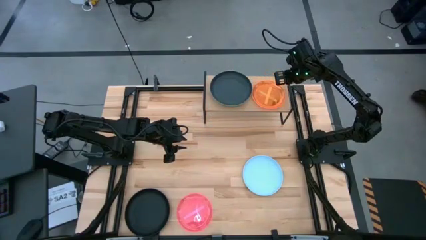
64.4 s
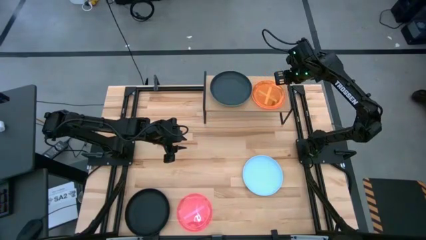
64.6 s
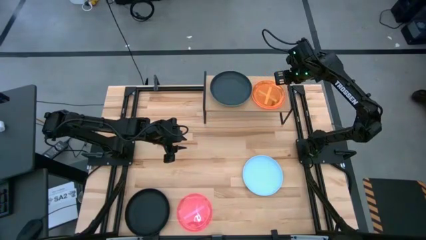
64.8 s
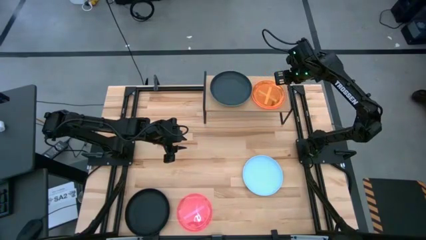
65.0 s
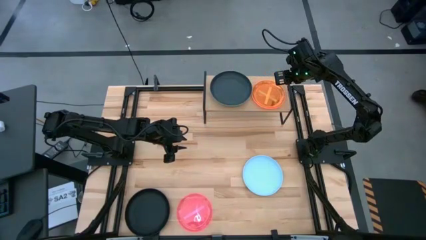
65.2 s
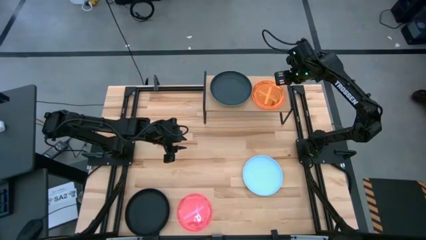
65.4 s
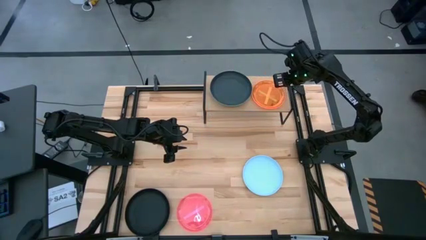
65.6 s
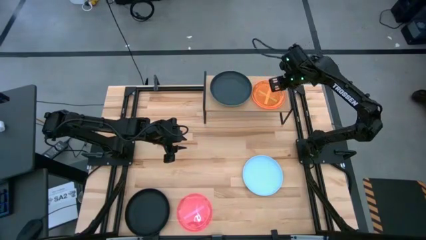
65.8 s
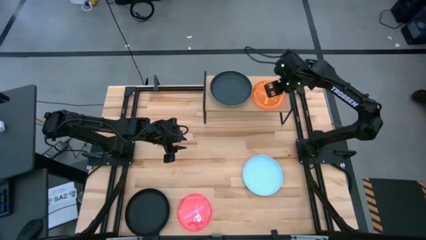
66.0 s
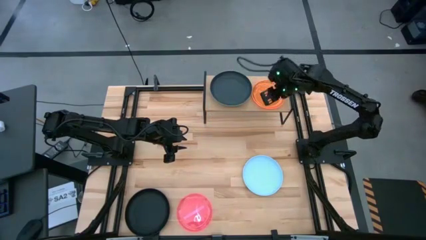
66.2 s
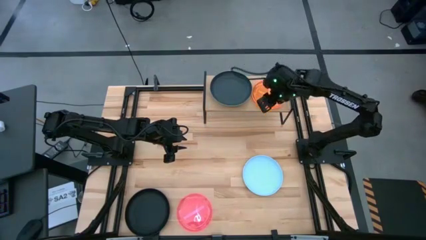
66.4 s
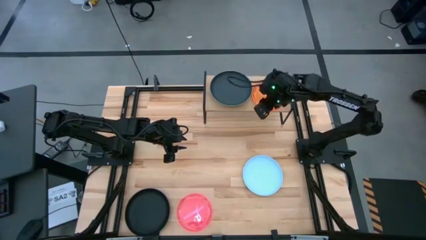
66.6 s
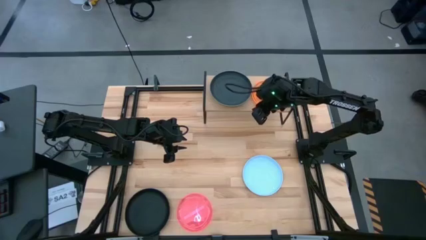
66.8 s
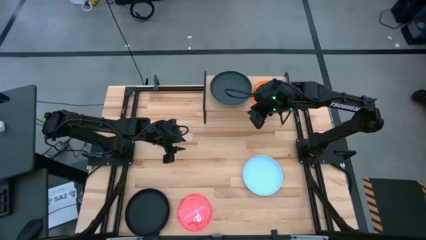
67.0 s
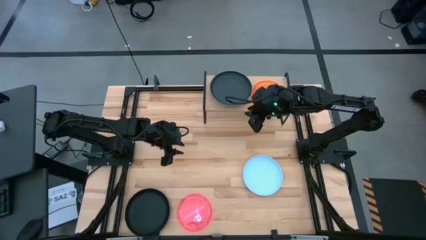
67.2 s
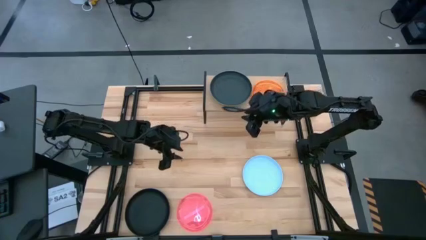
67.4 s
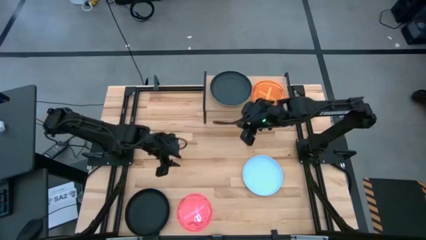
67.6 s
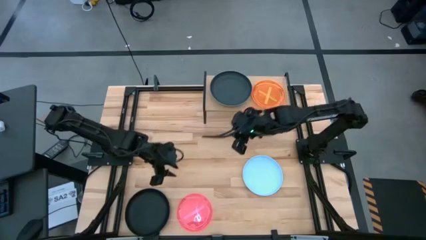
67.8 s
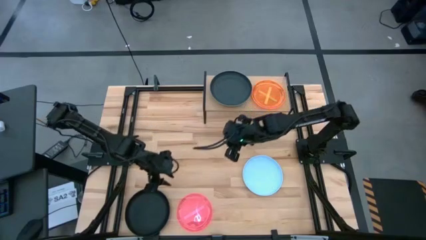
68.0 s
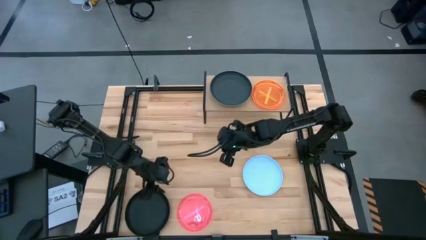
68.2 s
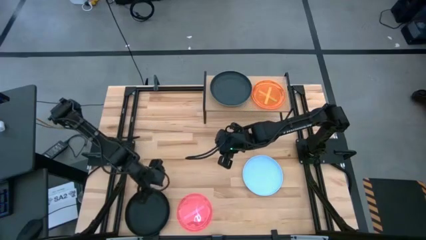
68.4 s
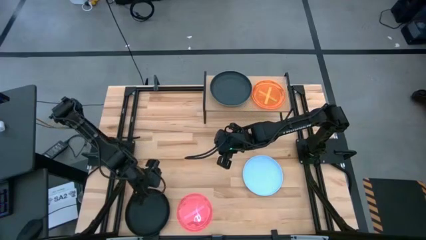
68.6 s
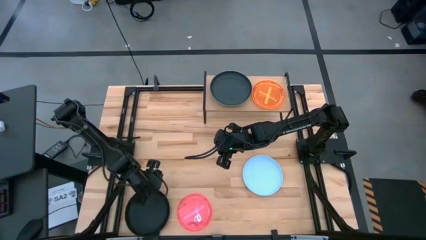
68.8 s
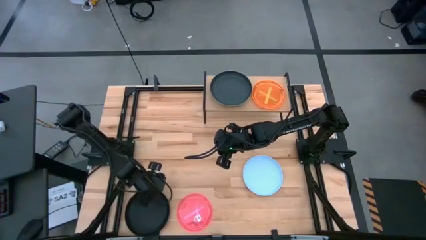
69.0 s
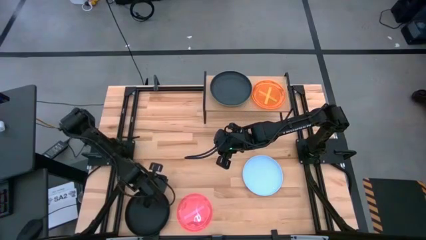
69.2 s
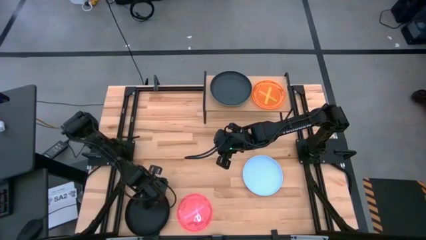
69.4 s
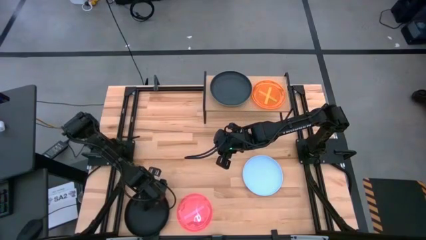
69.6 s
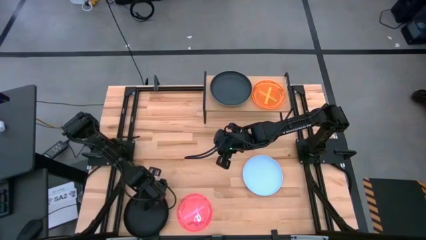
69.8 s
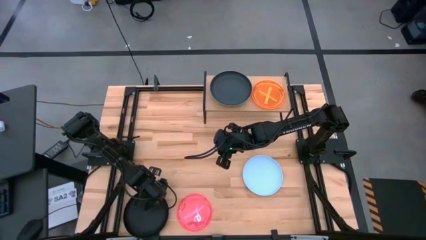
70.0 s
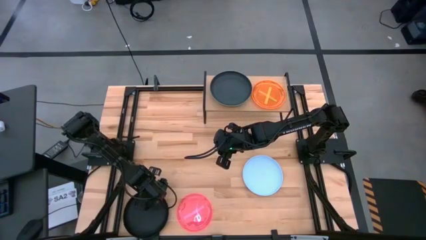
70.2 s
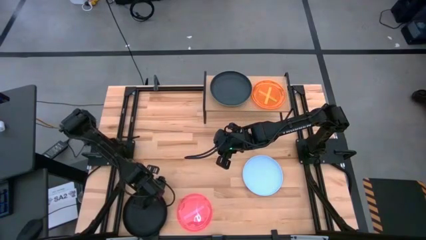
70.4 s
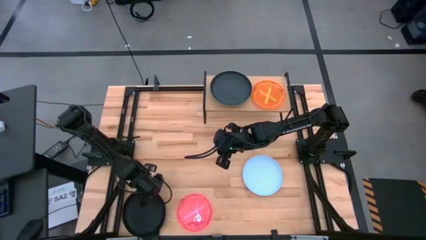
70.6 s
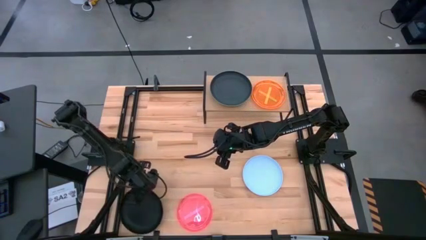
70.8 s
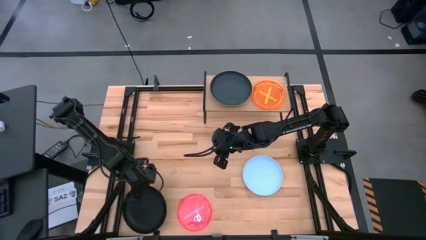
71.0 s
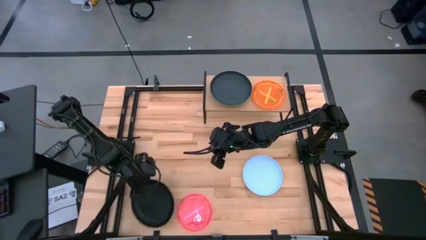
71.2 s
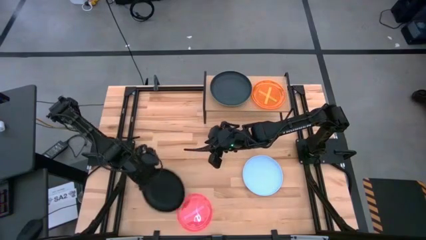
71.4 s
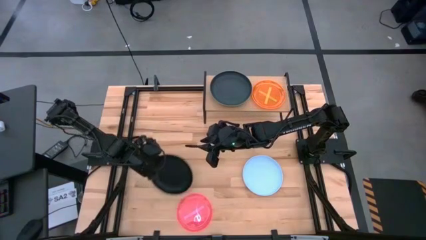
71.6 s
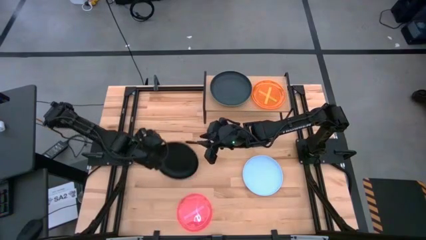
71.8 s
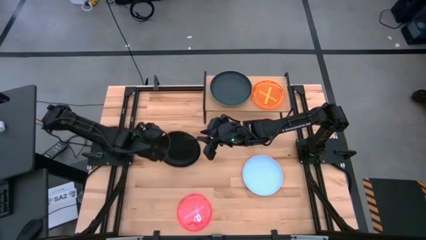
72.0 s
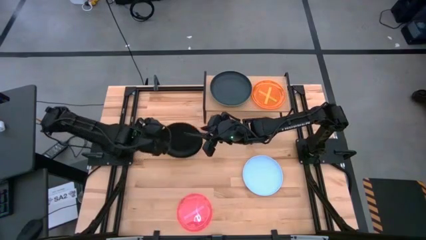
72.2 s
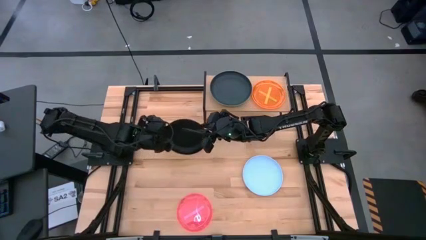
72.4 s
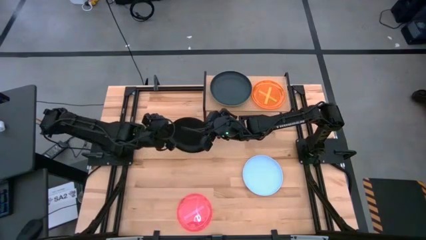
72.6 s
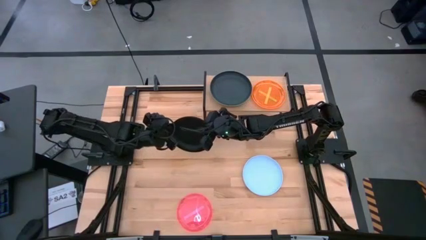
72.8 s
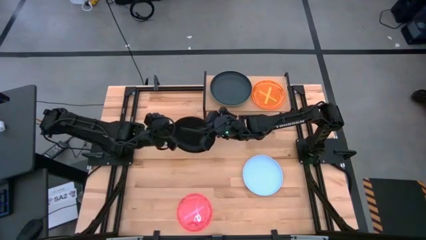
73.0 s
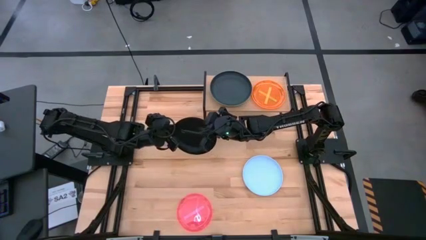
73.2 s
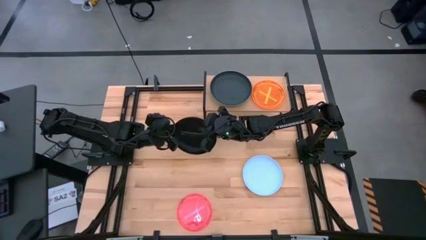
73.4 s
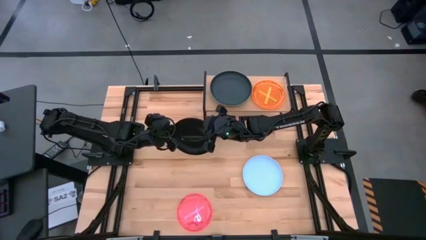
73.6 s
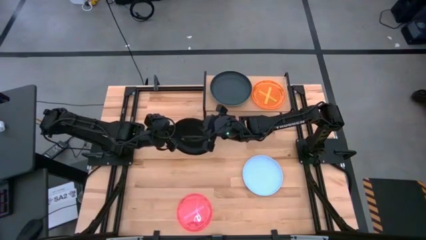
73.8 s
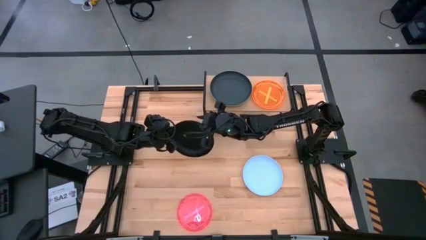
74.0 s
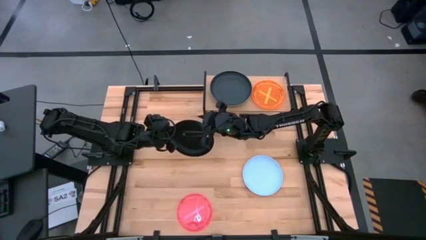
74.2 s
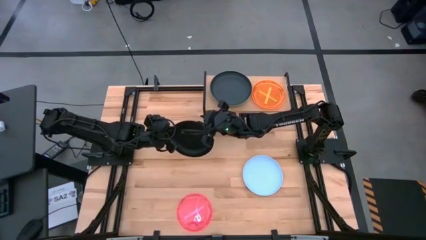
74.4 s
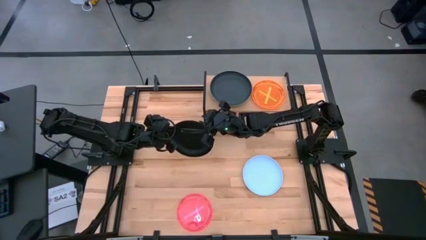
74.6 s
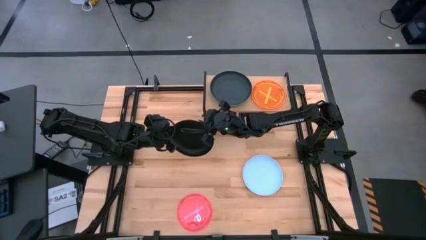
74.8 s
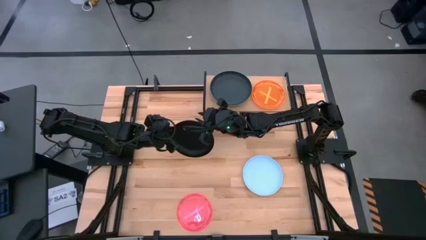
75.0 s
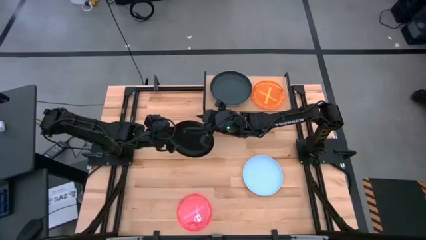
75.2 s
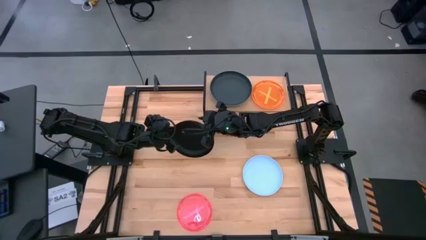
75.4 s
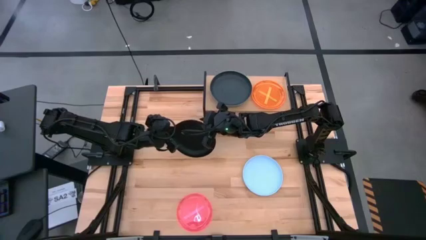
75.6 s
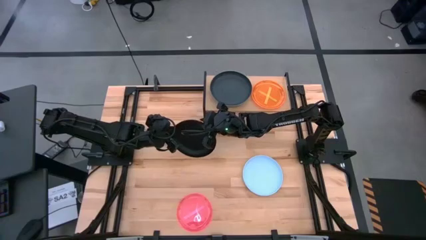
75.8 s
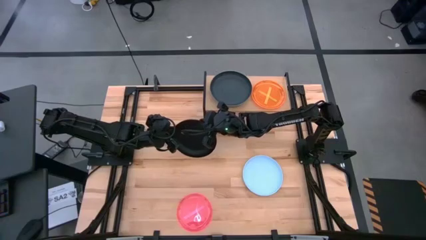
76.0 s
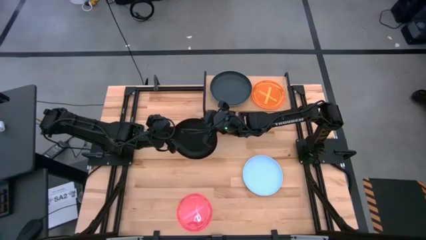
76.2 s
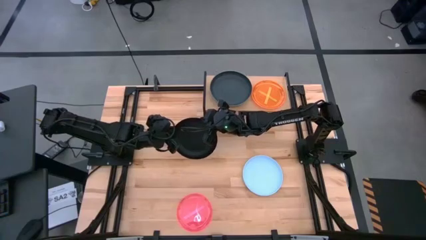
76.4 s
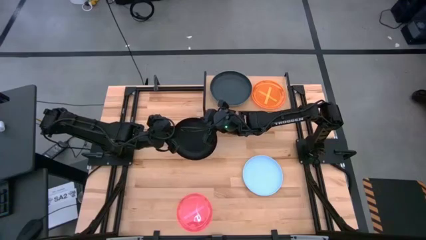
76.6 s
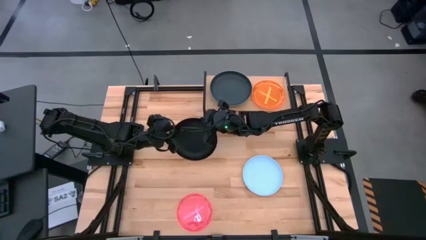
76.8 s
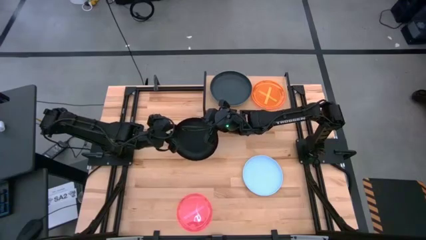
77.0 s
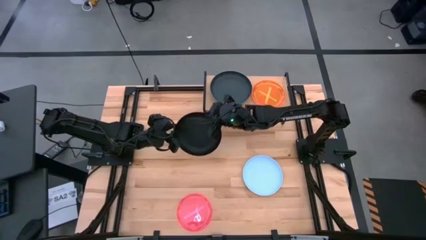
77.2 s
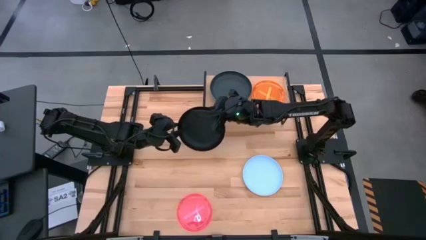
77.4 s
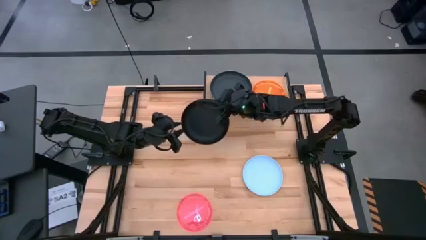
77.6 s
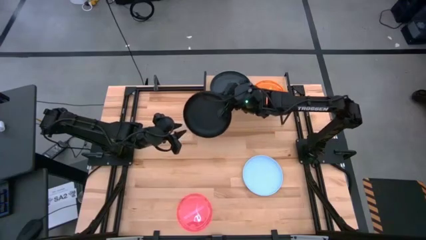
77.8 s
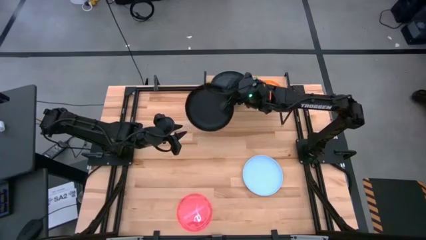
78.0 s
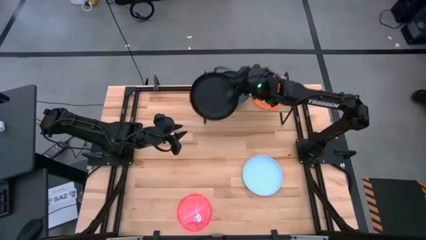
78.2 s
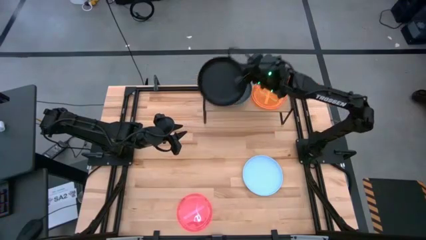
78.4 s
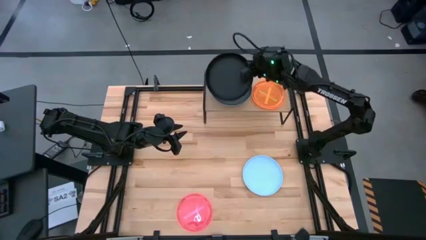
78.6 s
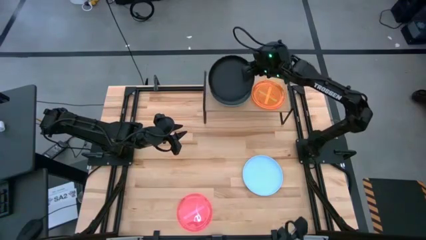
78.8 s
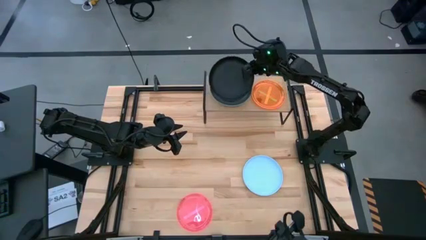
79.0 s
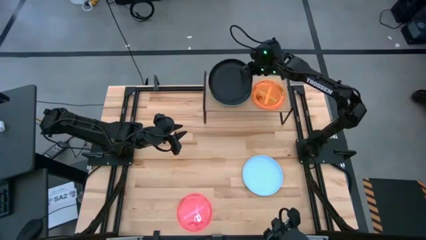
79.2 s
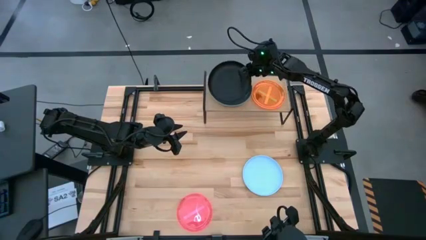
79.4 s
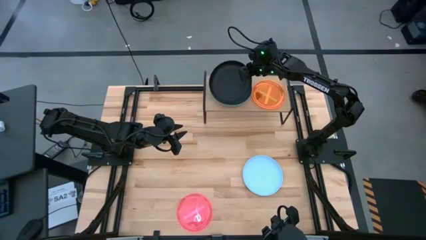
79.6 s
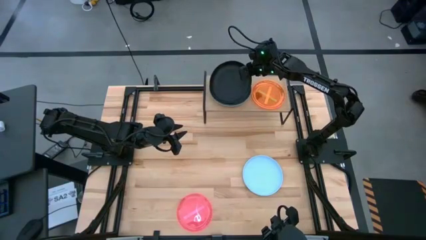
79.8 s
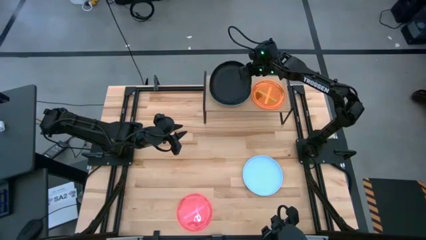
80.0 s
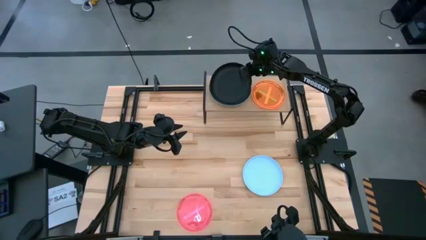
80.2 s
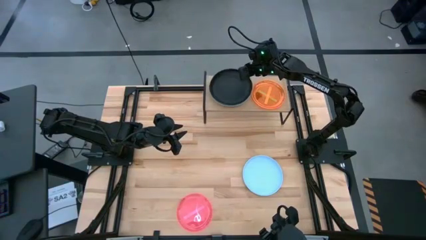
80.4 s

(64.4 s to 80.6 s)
Task: Place and stack plates onto a shelf
Stack the black plate on top of the black plate on the shelf
